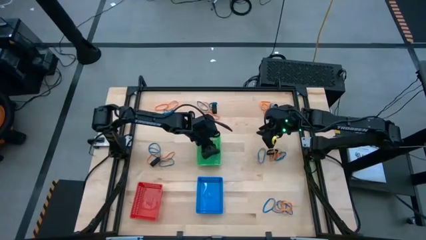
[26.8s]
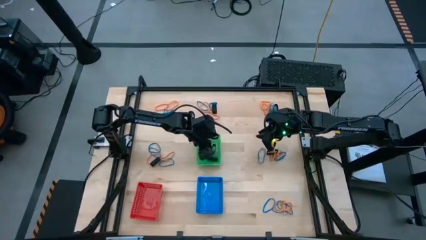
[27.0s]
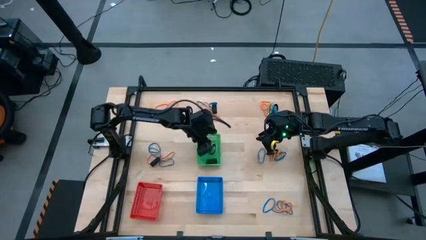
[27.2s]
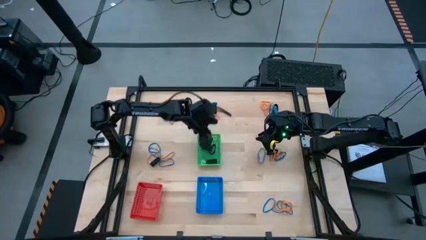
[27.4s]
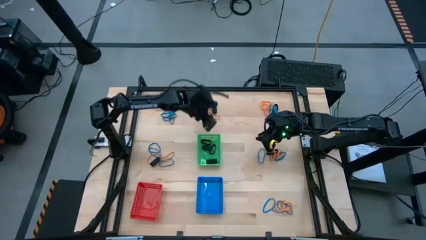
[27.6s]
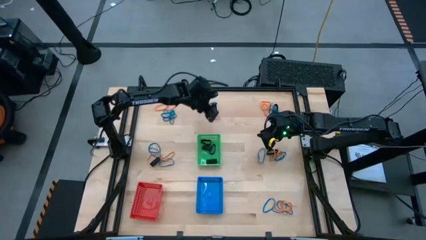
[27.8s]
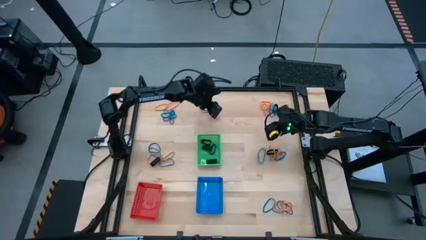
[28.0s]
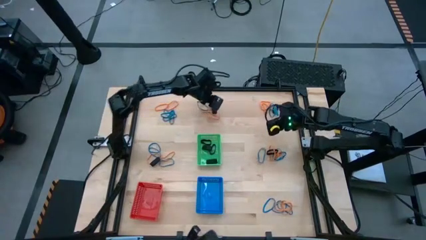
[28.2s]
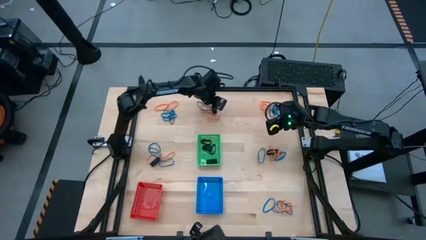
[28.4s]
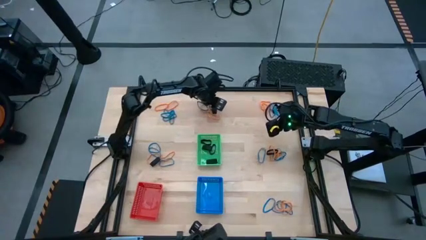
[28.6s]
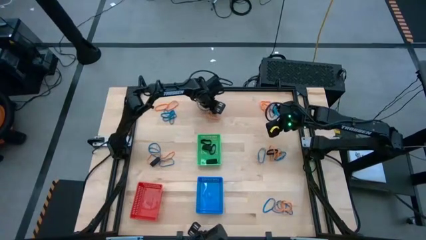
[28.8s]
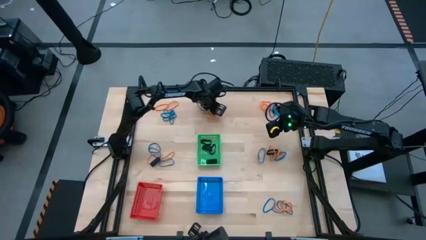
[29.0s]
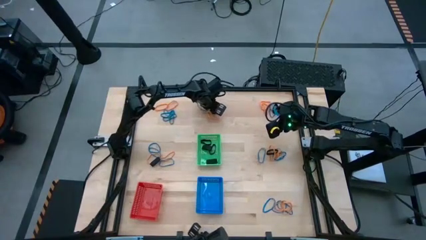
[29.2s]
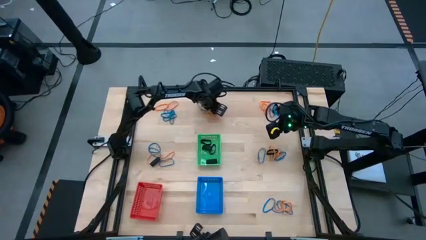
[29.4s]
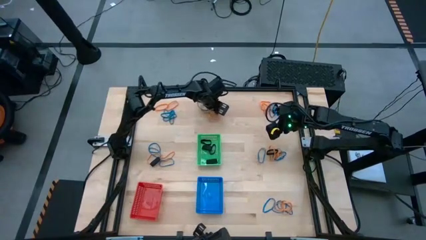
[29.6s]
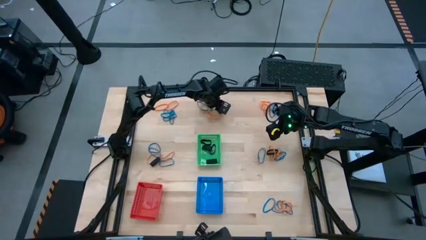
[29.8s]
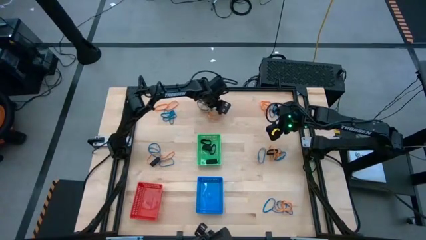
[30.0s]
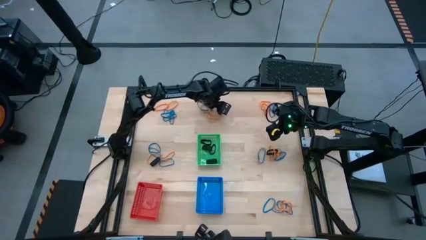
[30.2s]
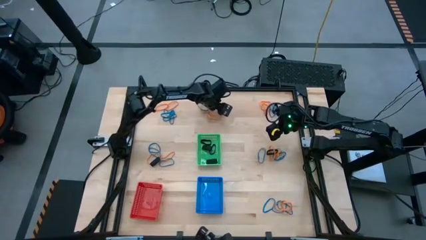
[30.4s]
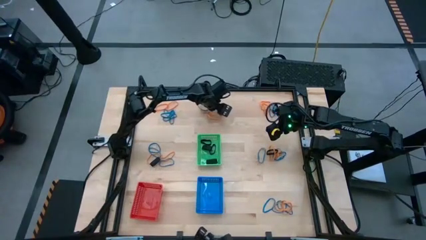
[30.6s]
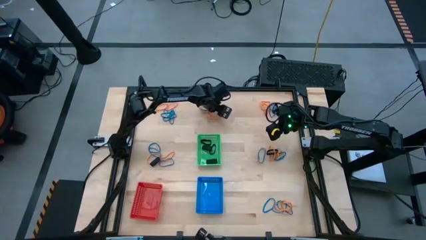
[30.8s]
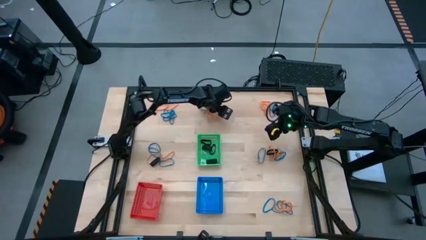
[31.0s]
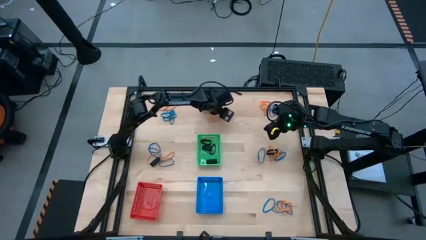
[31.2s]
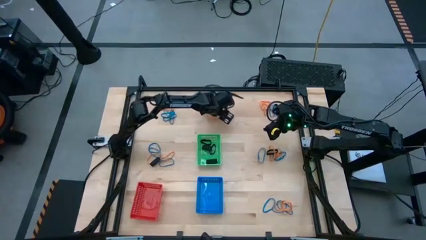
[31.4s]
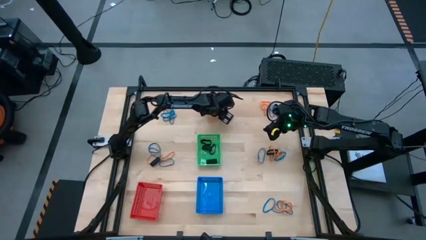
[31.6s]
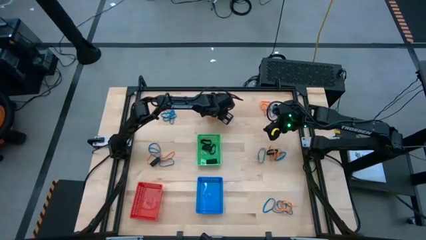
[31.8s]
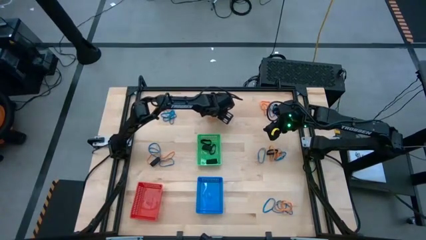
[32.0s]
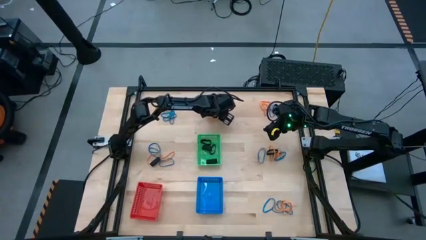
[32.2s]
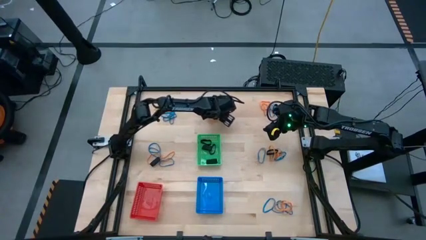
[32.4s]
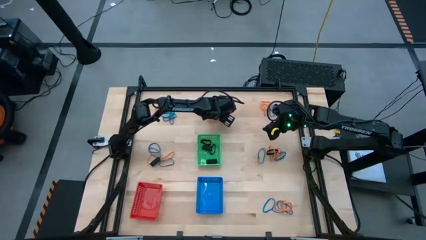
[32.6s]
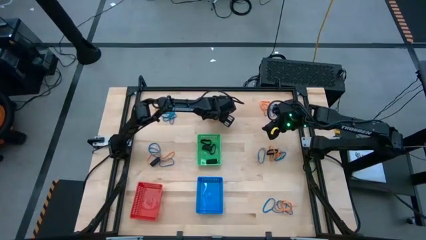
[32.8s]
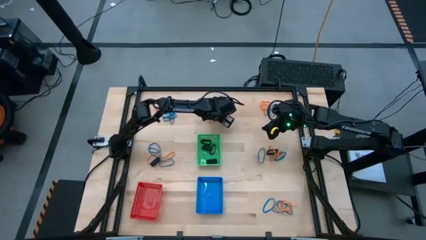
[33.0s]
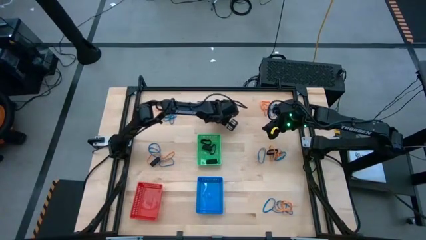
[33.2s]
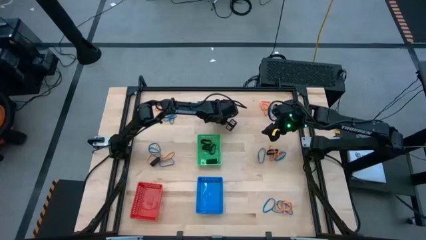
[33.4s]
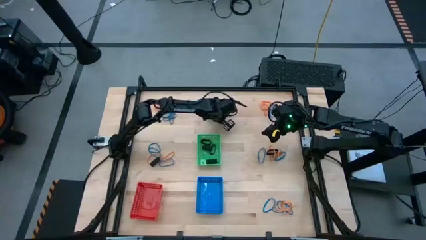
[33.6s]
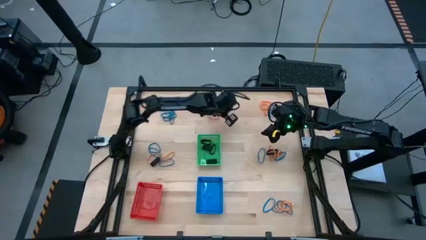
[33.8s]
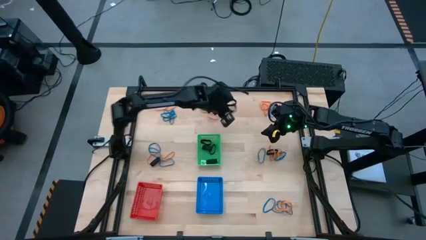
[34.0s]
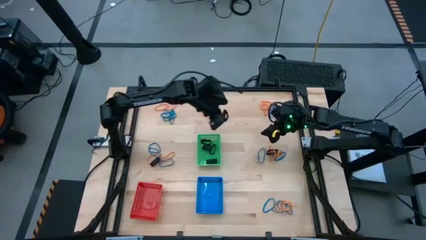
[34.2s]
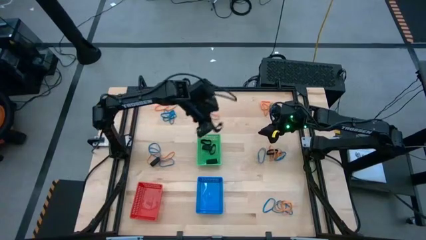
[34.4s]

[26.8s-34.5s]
Task: Sort rubber bands into baskets
Put the black rubberband into the green bin

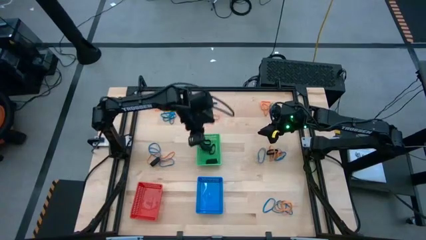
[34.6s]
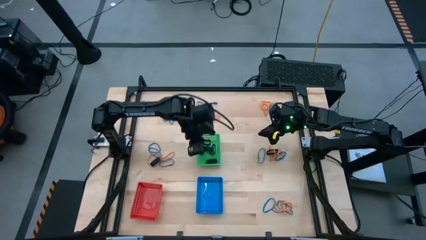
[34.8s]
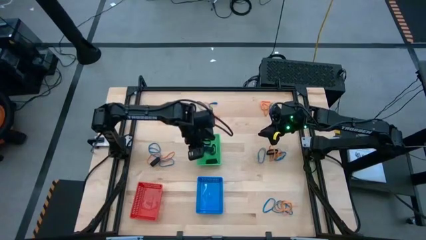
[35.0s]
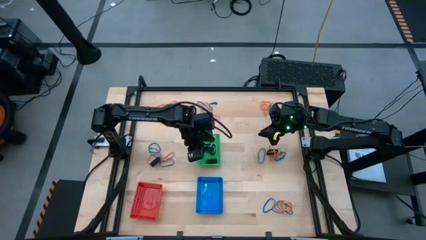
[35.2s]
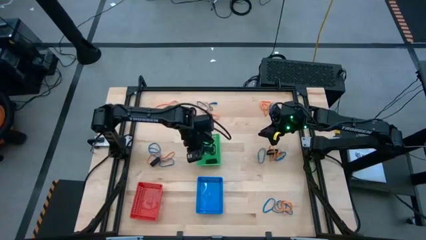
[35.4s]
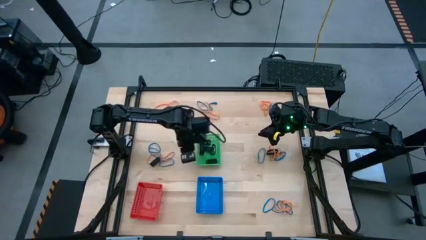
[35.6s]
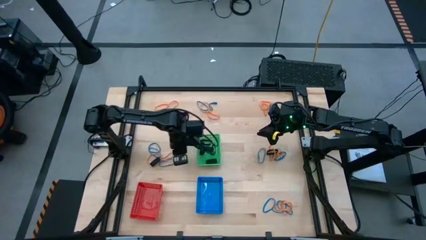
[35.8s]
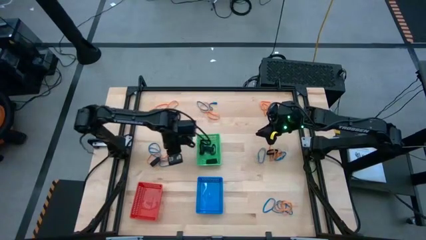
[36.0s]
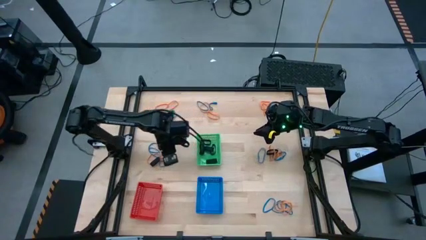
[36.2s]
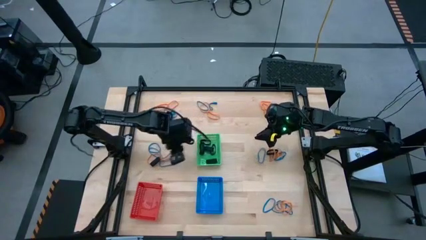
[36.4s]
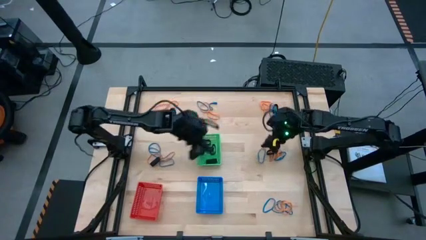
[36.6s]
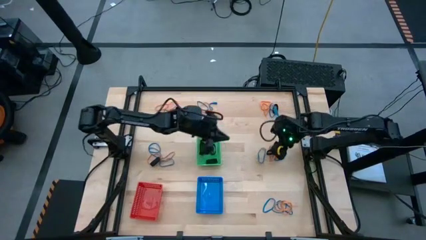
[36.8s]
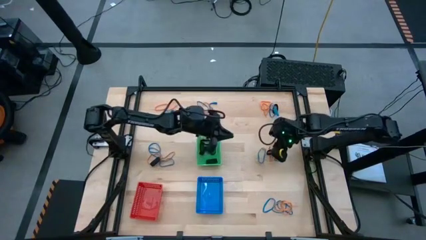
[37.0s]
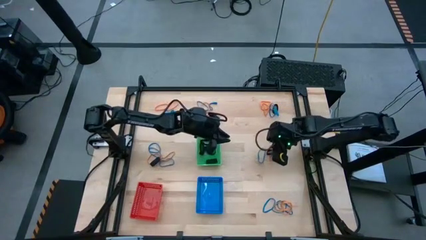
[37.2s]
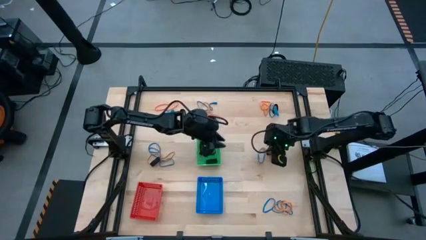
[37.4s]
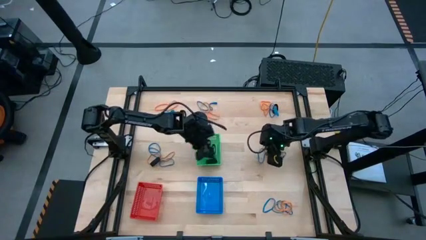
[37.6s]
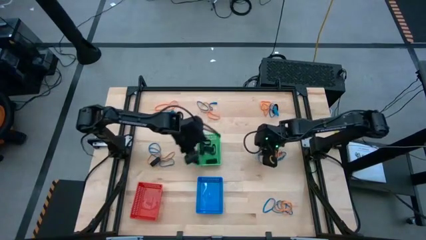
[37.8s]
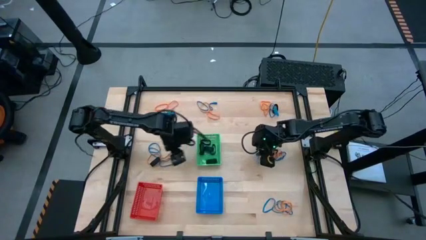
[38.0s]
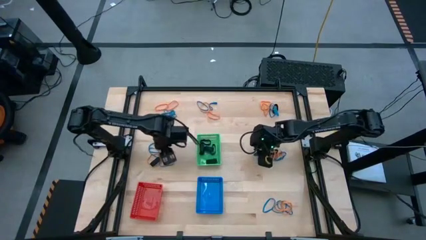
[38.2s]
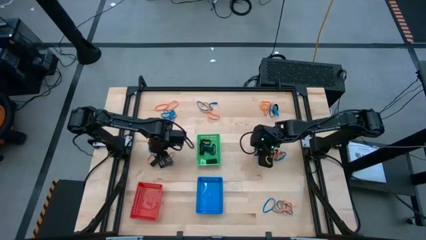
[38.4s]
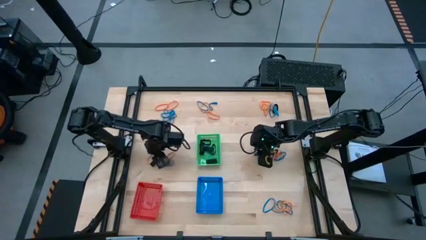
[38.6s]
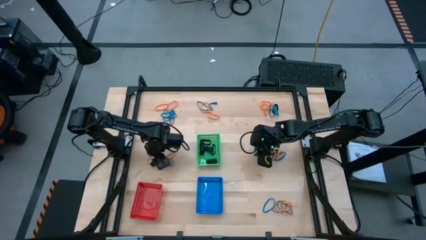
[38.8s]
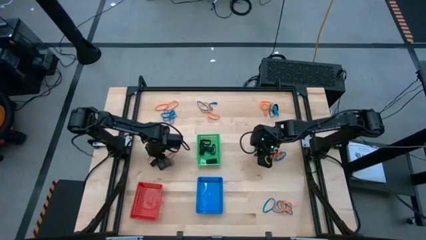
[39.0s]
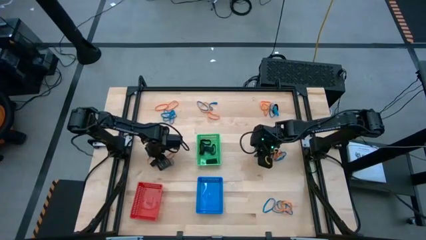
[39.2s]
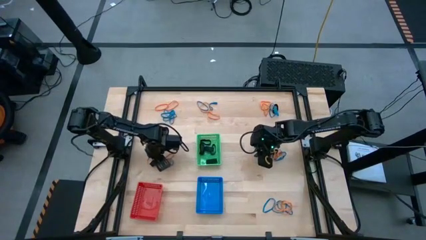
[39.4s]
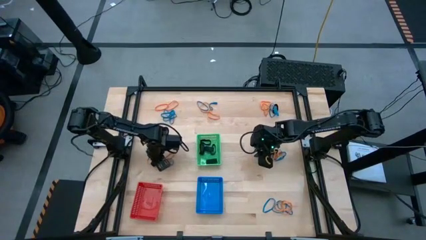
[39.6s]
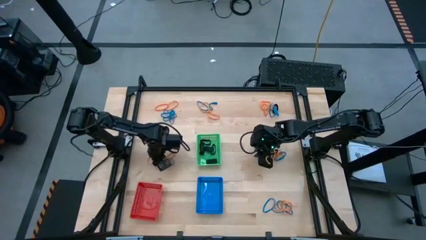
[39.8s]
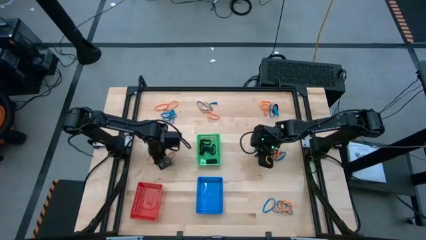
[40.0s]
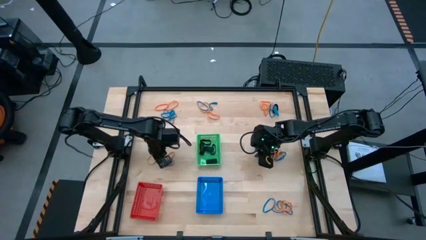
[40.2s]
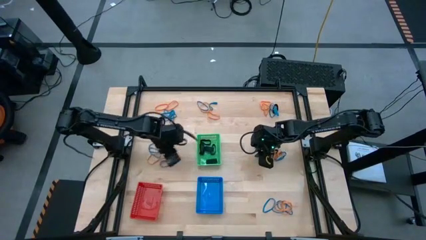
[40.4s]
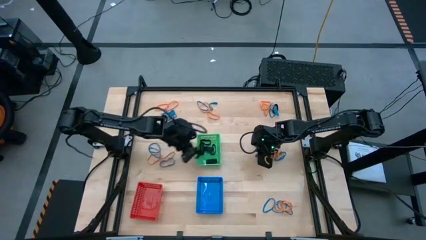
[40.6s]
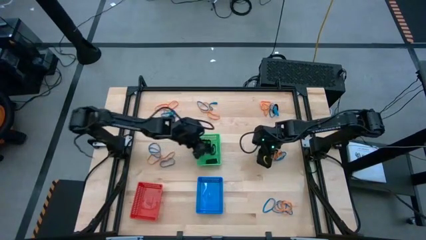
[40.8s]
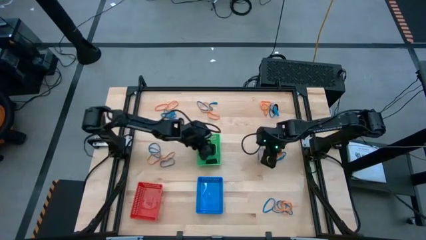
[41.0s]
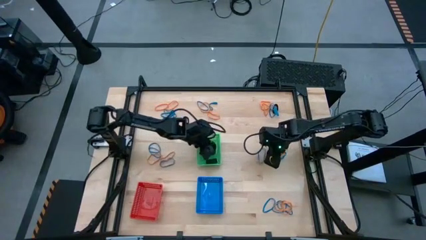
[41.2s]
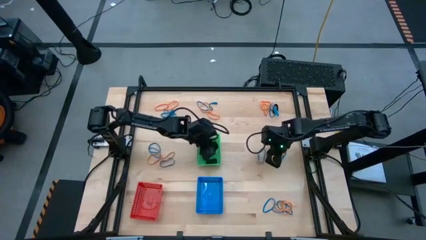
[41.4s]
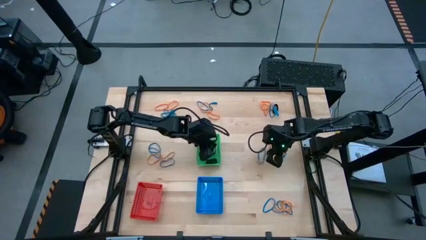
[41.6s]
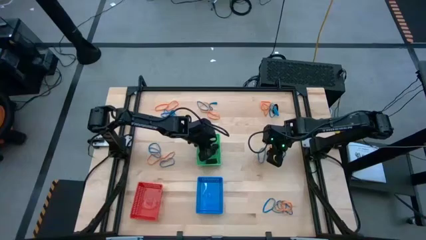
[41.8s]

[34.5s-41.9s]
Put the black rubberband into the green bin

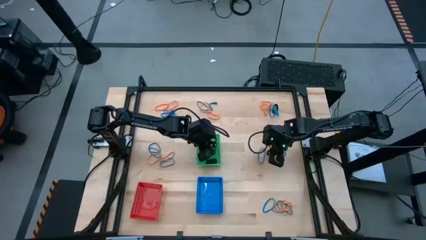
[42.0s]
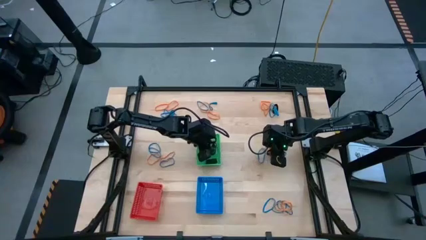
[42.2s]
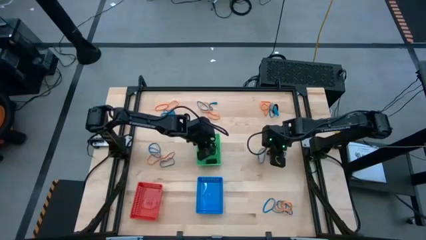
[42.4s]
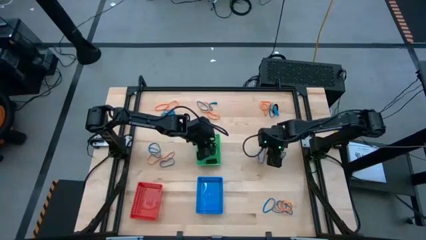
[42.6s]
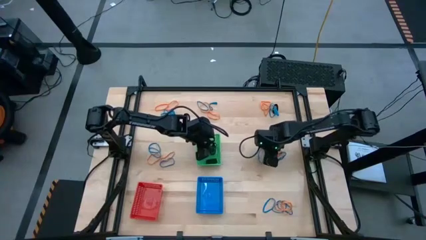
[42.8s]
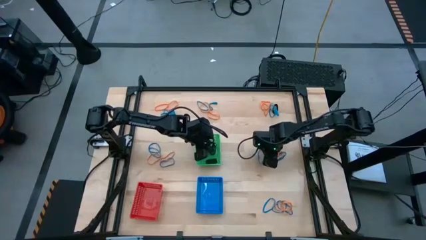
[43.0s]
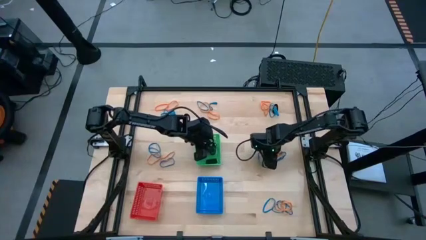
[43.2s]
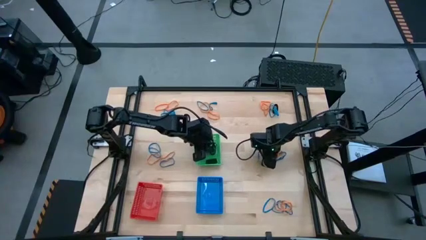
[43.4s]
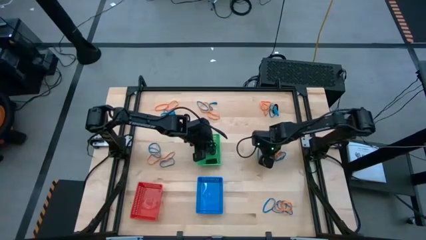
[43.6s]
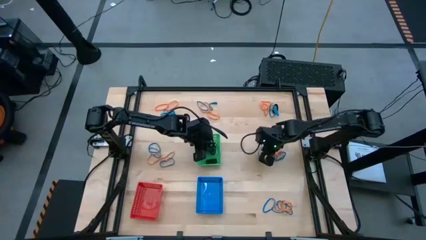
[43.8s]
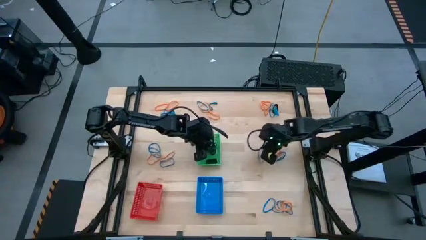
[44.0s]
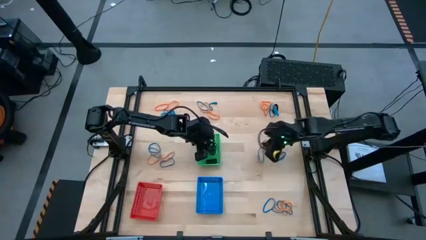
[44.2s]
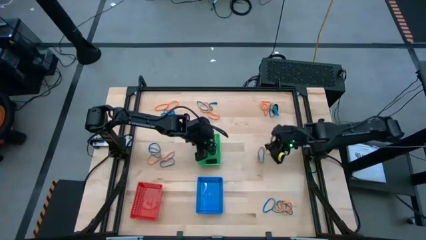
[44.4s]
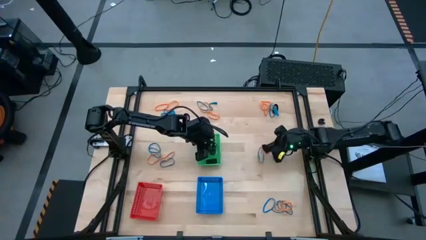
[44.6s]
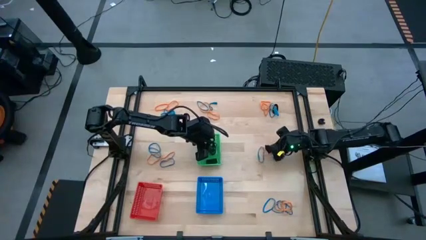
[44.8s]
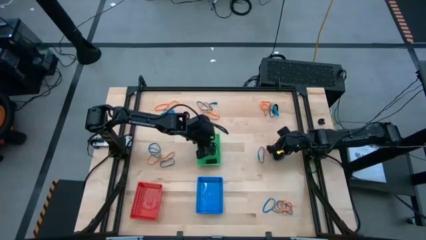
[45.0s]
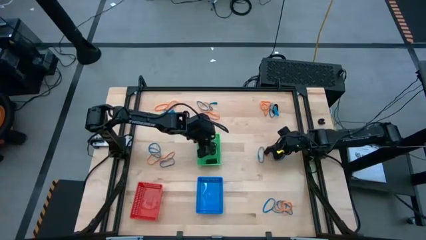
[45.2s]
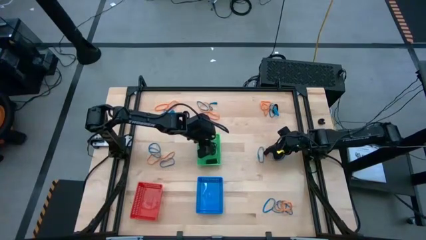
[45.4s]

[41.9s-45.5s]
Put the black rubberband into the green bin
